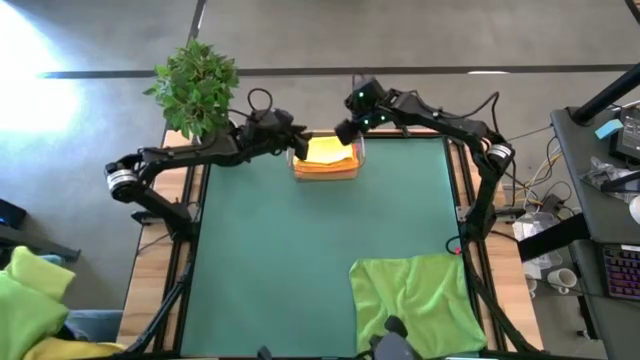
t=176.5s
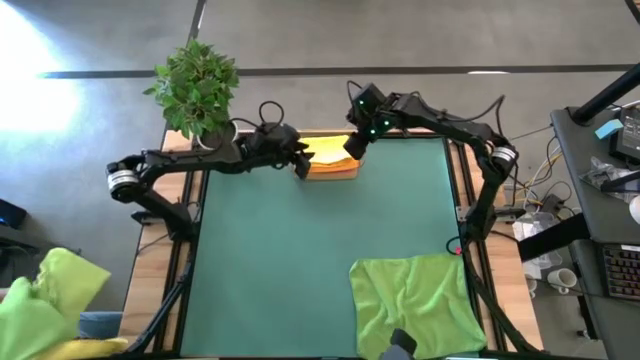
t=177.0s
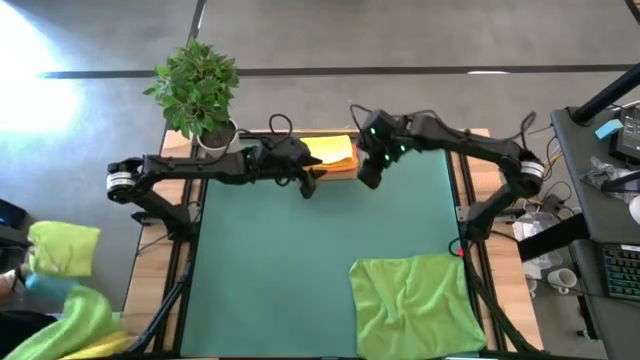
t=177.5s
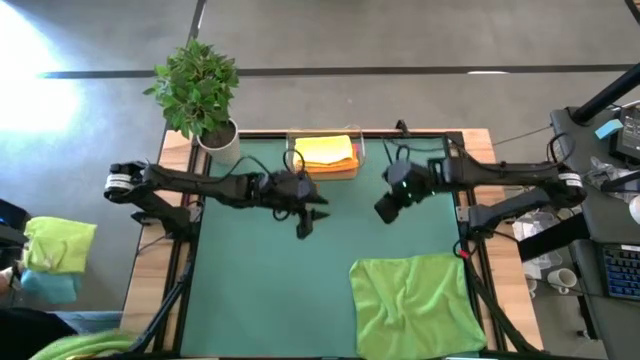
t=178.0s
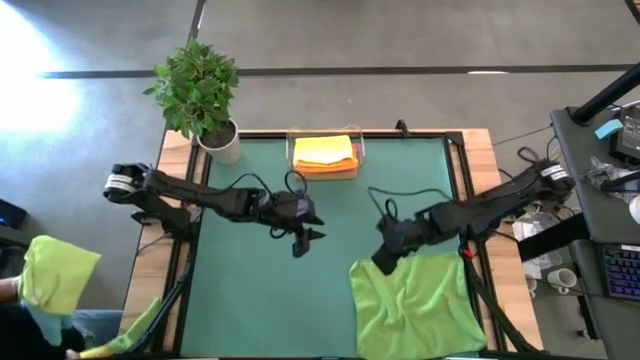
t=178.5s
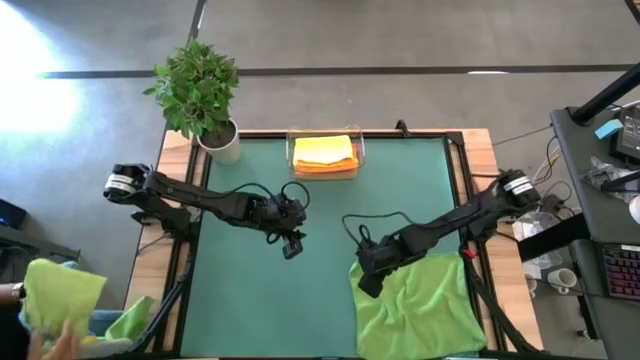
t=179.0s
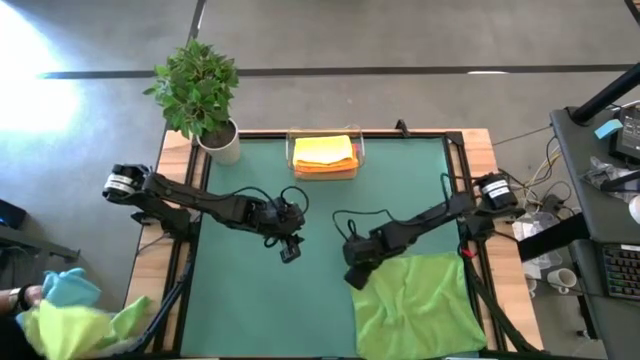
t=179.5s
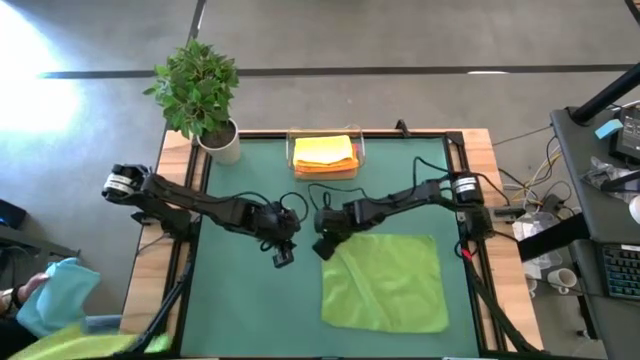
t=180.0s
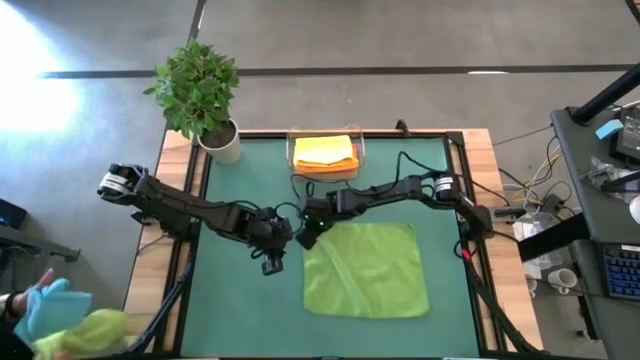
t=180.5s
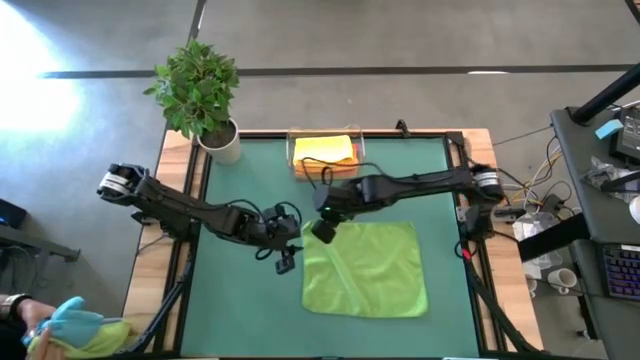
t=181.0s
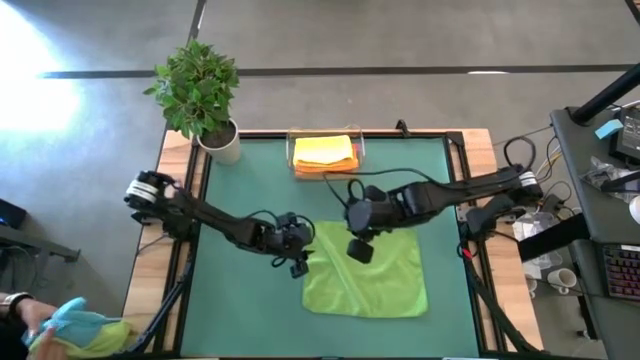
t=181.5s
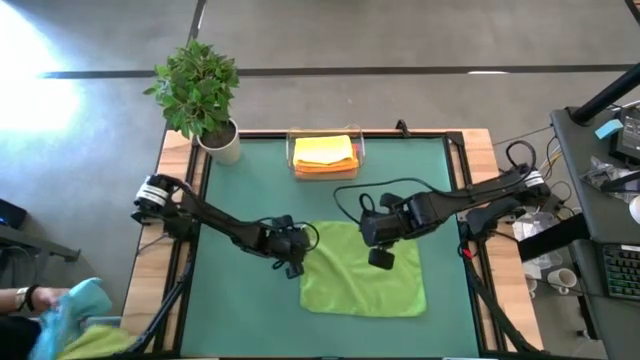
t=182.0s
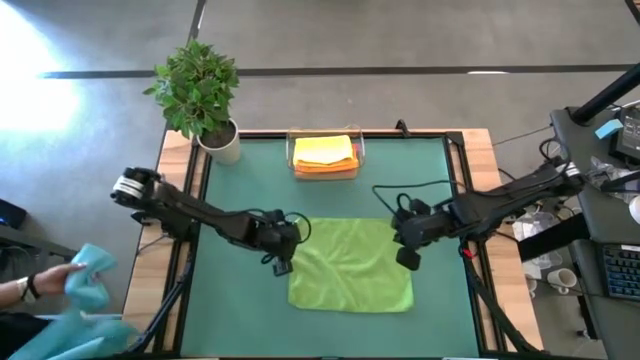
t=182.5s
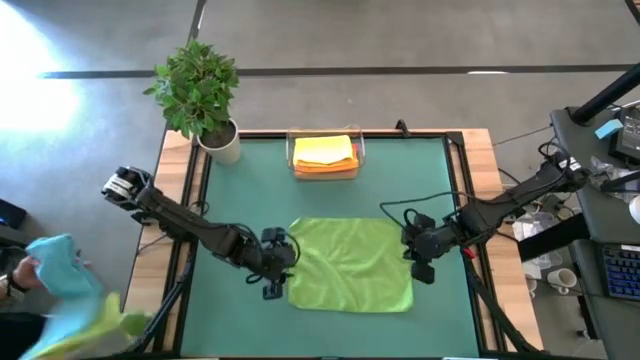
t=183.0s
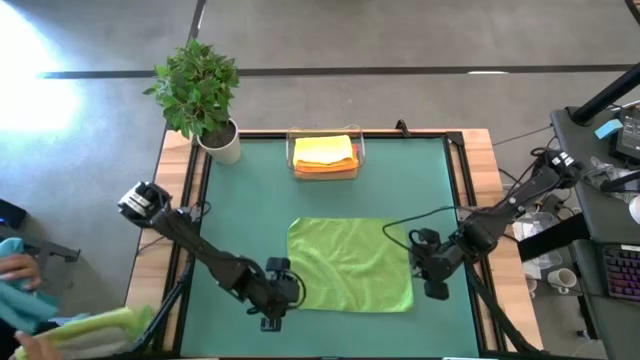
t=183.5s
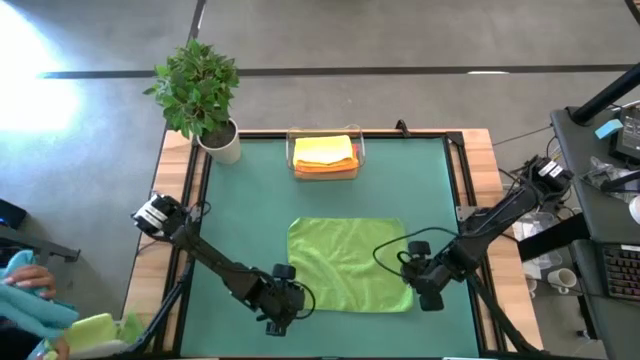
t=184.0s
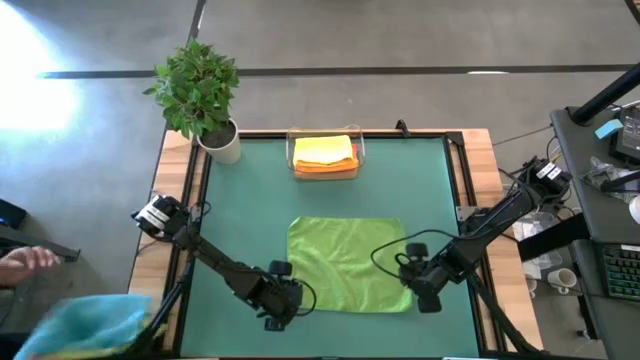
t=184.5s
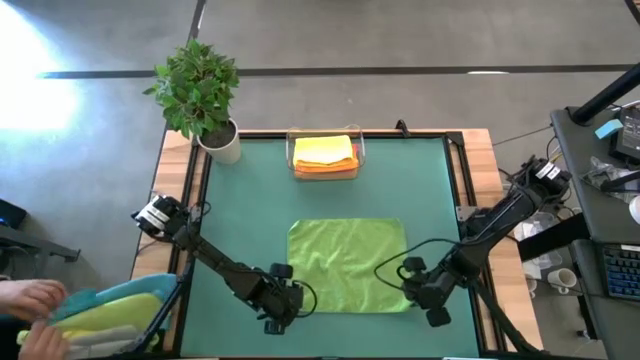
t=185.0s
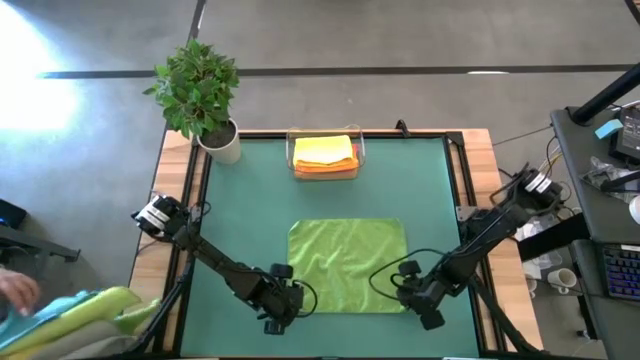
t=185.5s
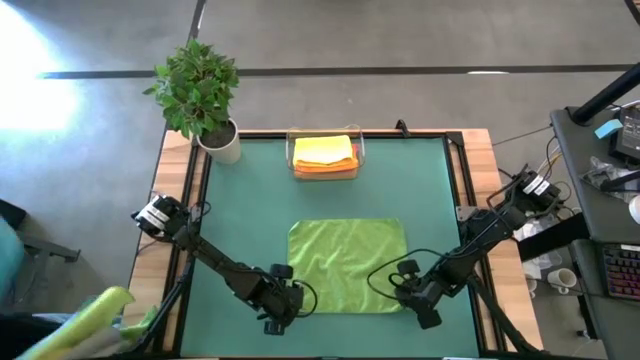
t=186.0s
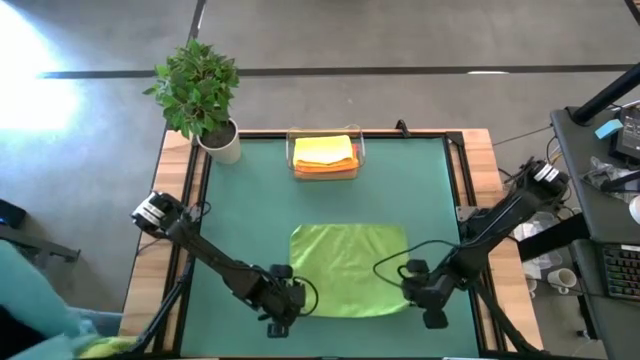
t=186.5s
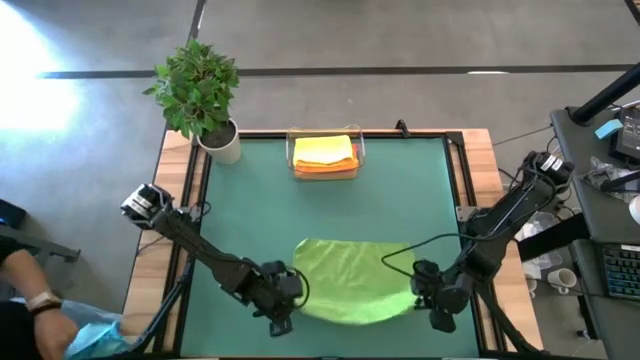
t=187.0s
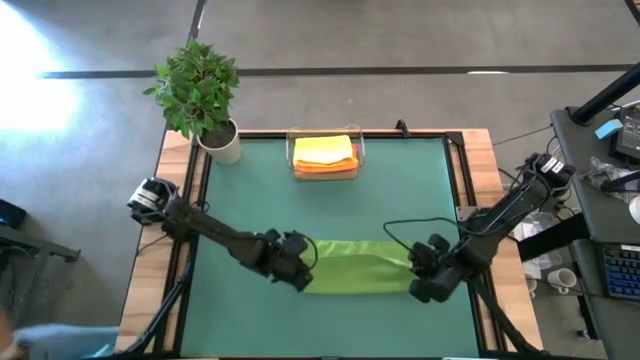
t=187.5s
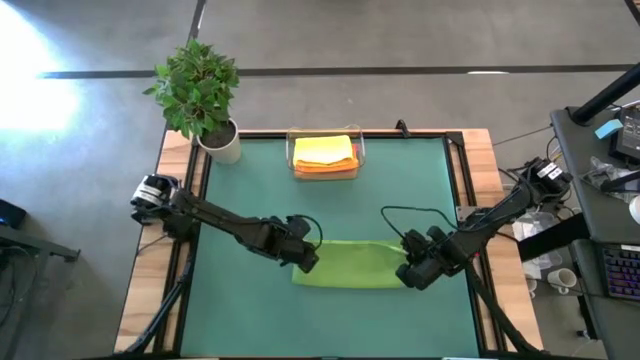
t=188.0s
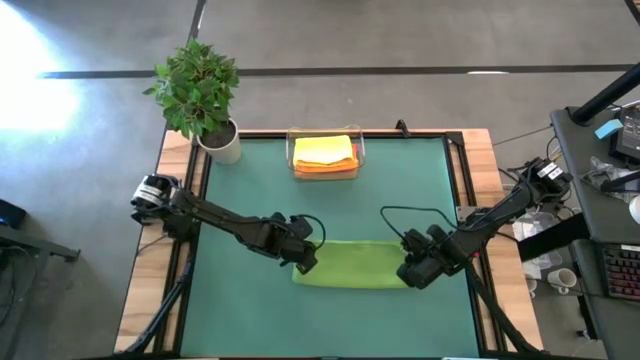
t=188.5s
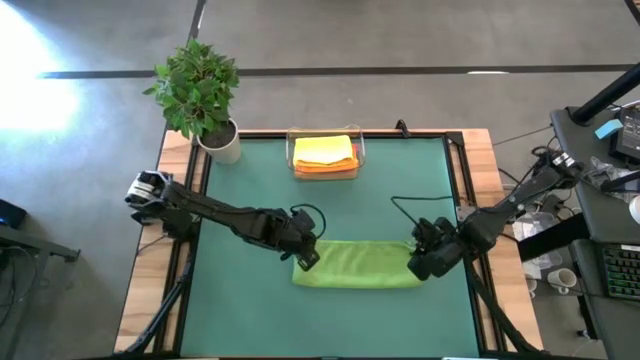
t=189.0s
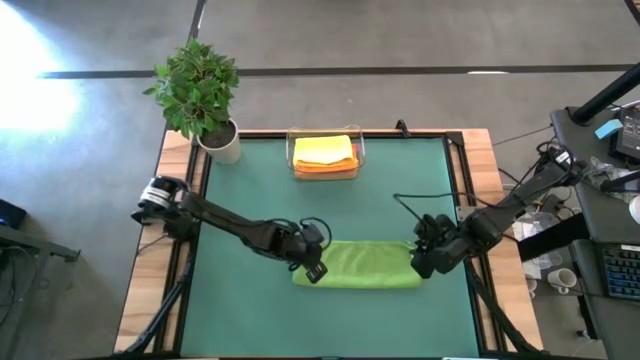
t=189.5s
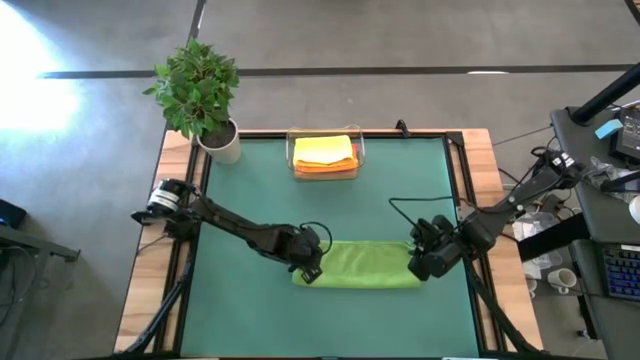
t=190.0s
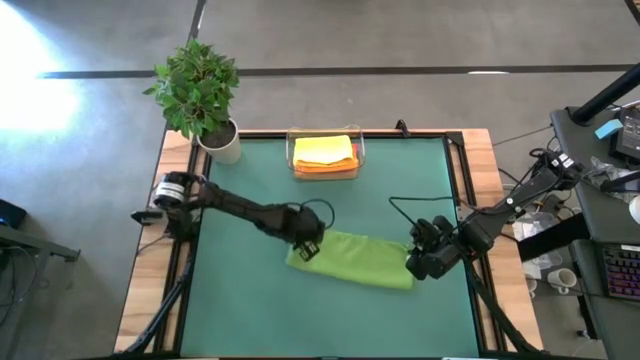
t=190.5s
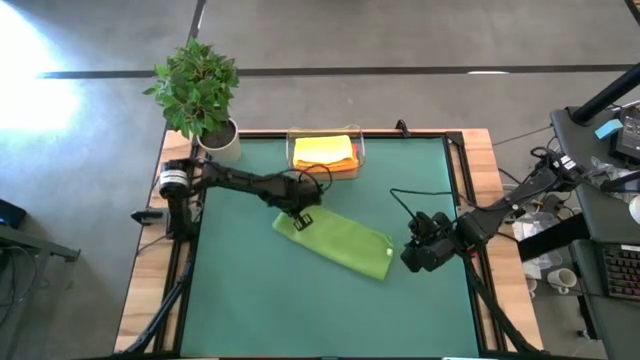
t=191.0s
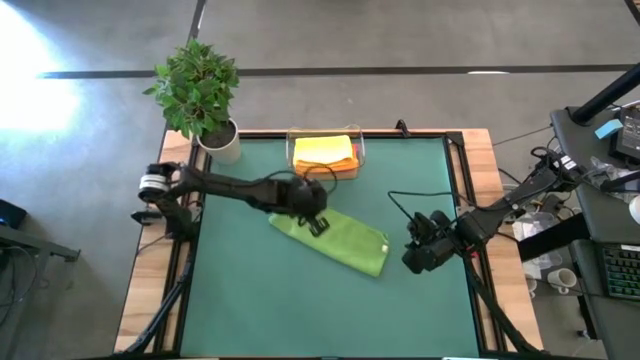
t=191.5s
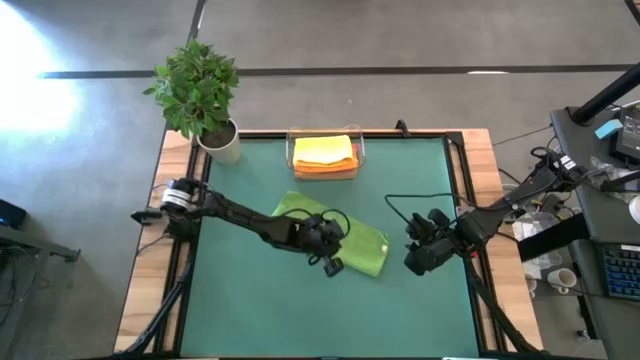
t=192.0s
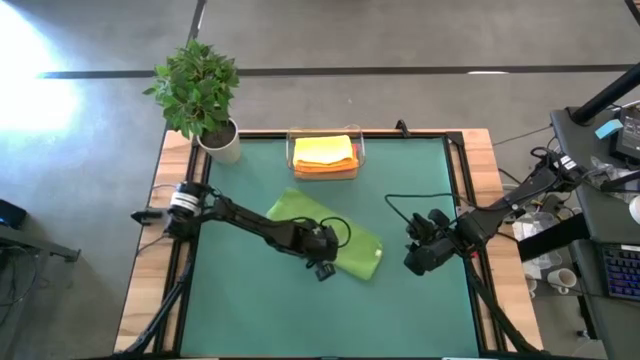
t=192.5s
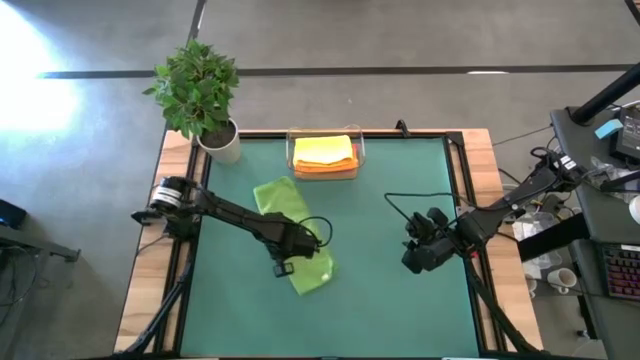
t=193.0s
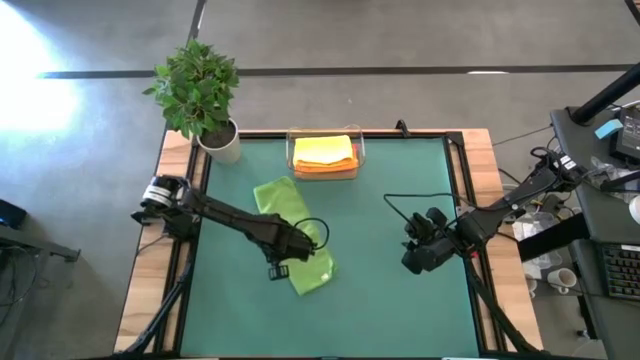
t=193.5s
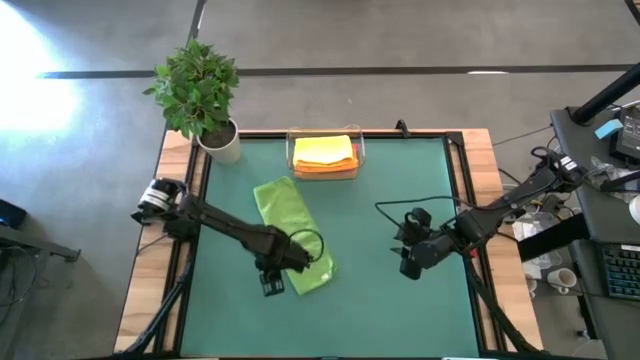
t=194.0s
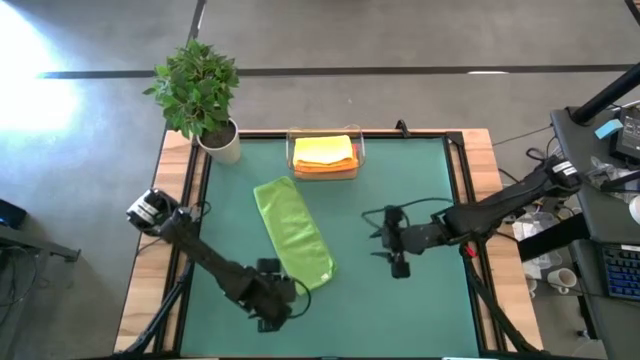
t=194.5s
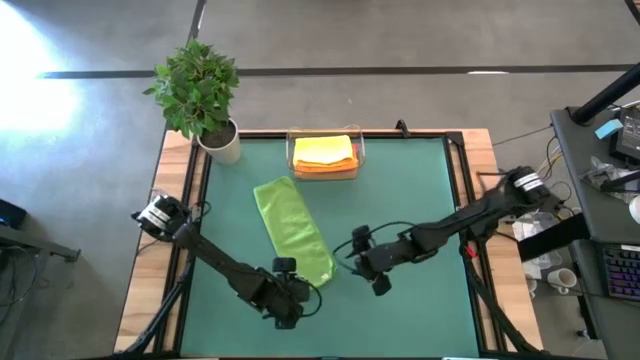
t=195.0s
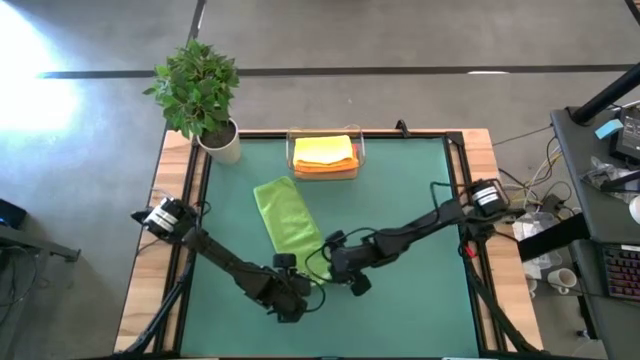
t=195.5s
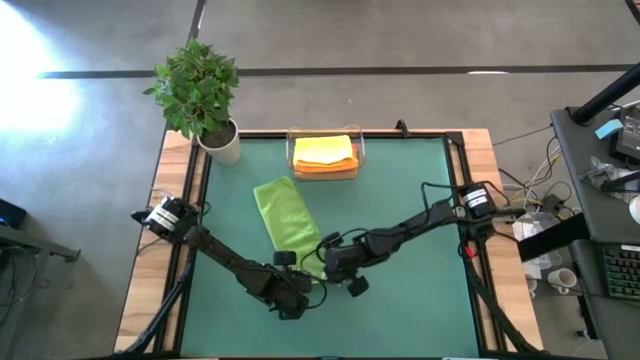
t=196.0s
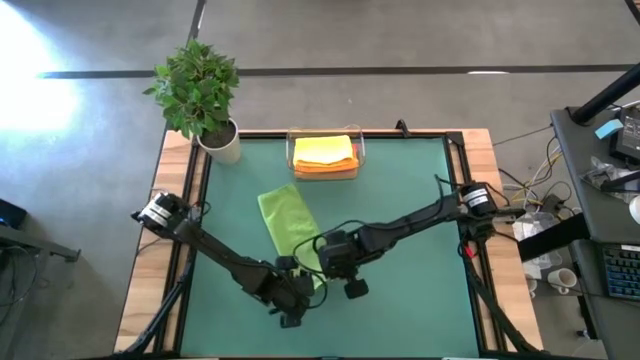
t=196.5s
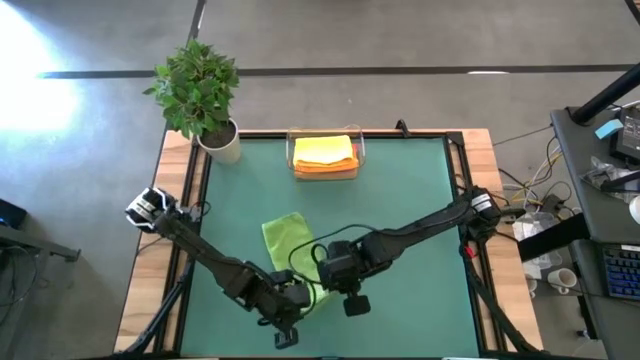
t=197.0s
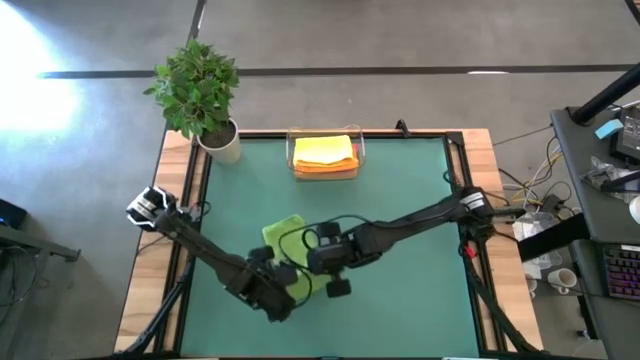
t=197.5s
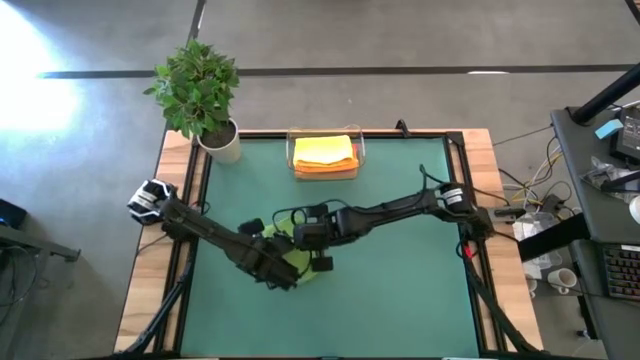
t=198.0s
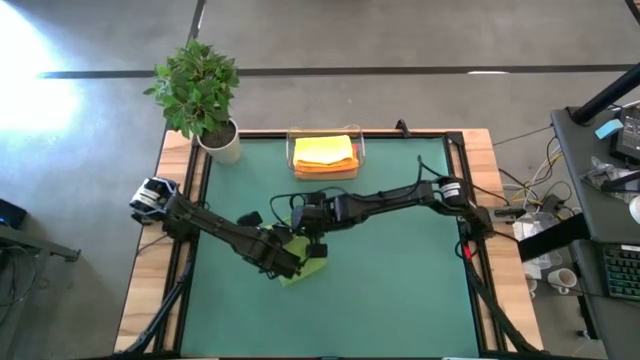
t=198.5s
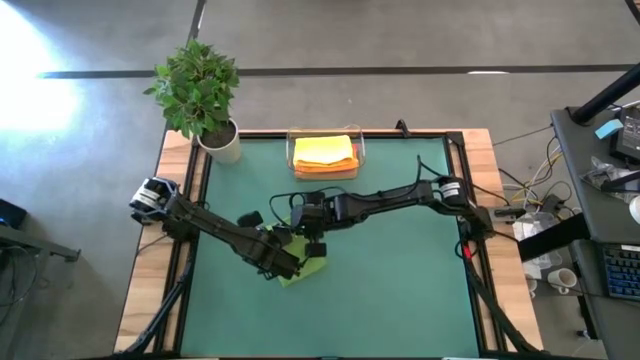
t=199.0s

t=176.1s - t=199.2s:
Task: Fold microfiber towels
Fold the green microfiber cloth
